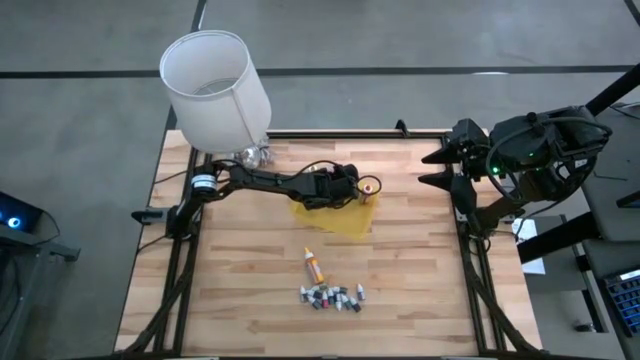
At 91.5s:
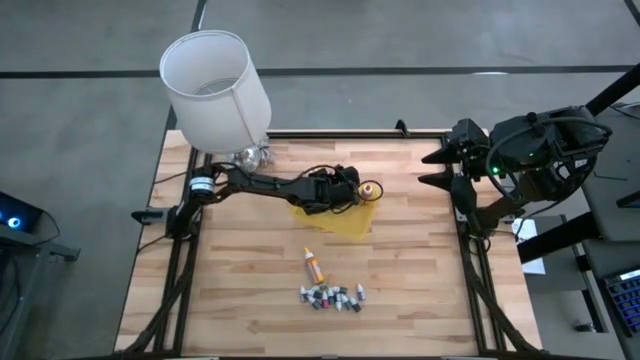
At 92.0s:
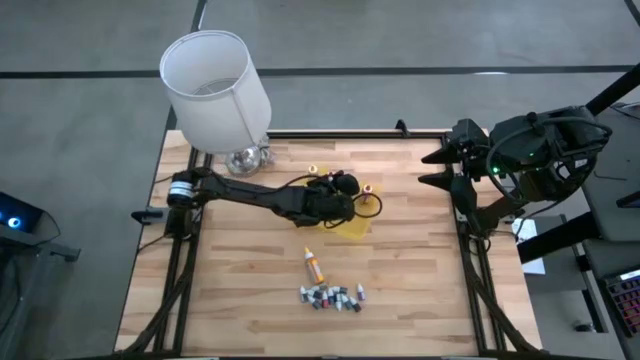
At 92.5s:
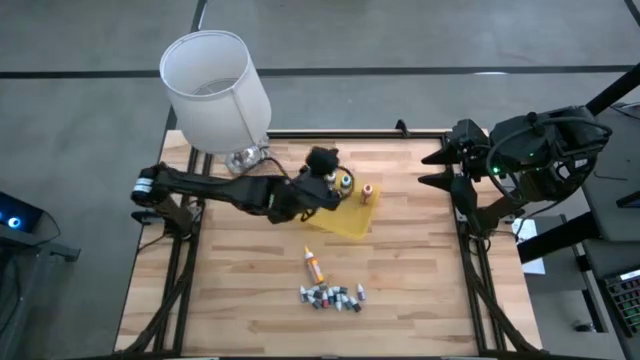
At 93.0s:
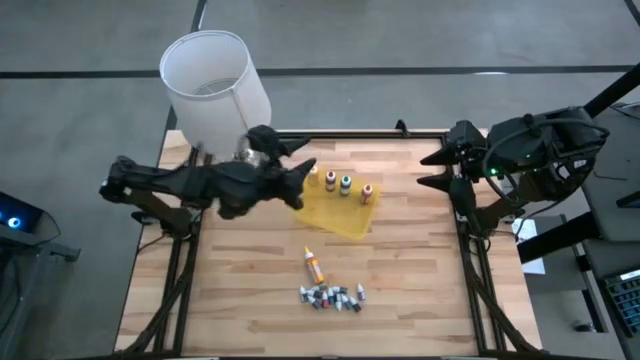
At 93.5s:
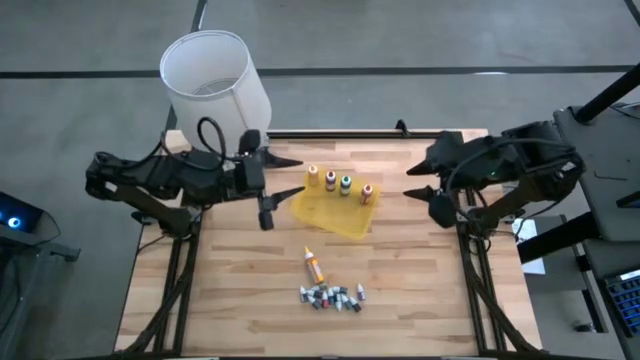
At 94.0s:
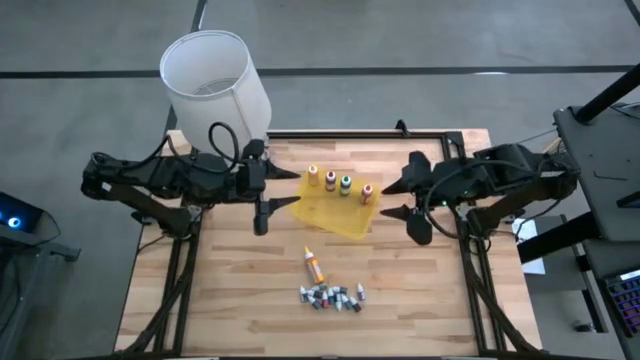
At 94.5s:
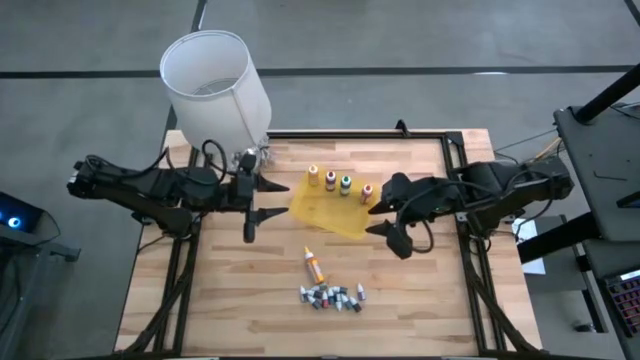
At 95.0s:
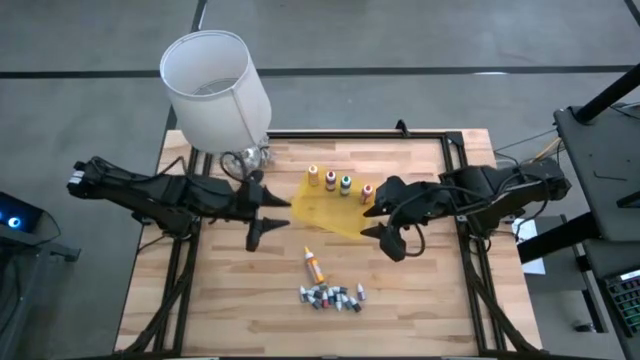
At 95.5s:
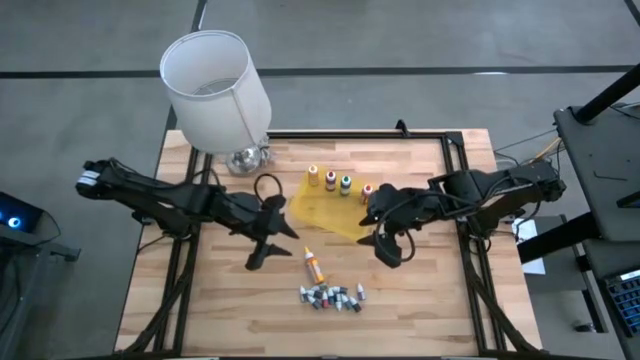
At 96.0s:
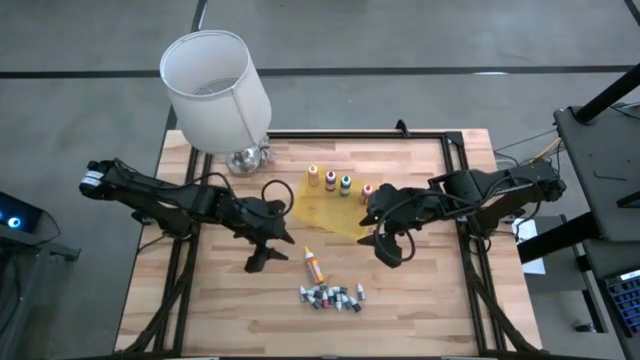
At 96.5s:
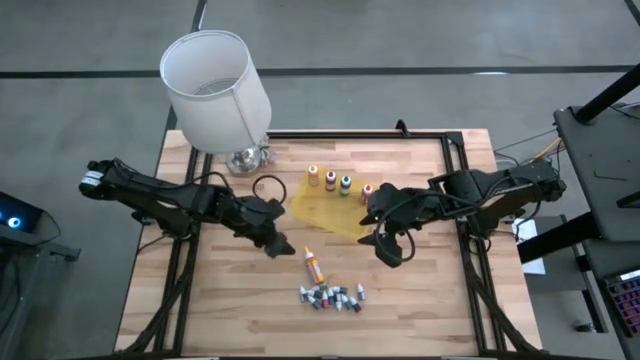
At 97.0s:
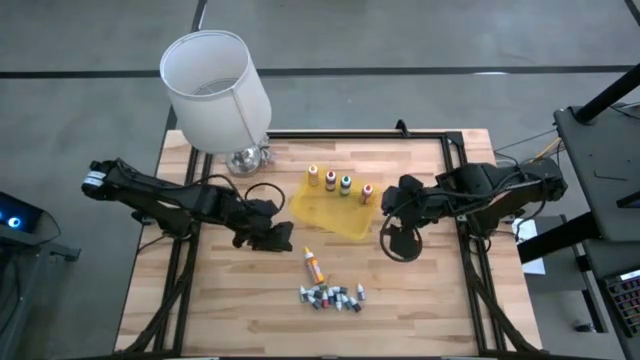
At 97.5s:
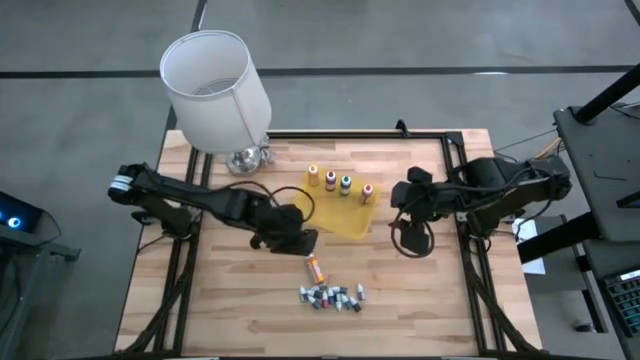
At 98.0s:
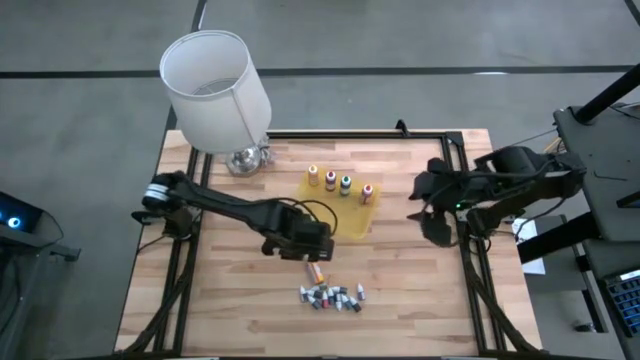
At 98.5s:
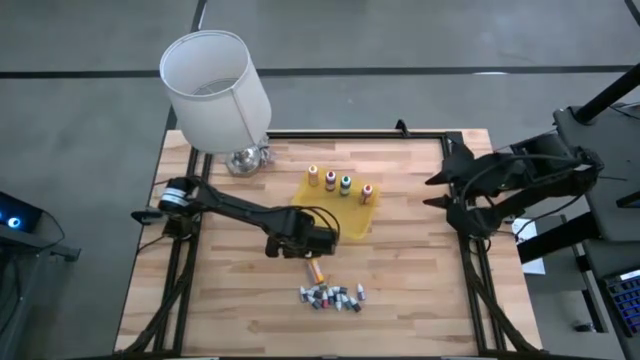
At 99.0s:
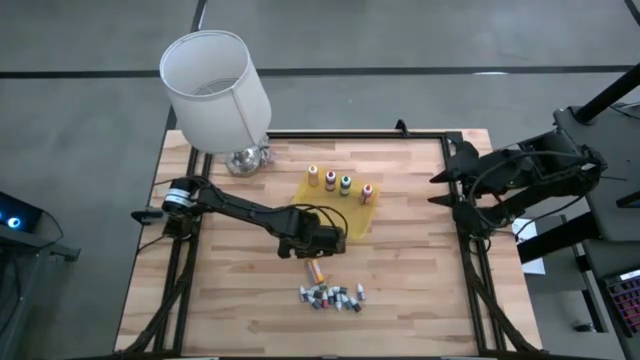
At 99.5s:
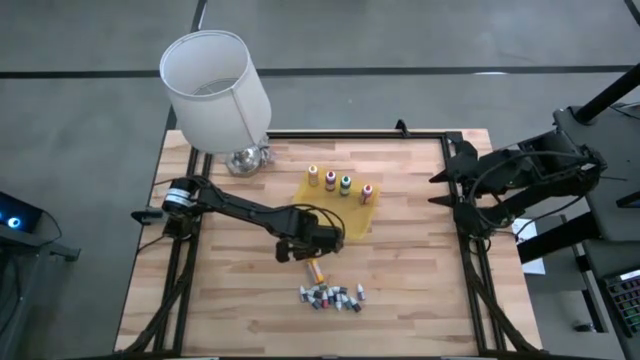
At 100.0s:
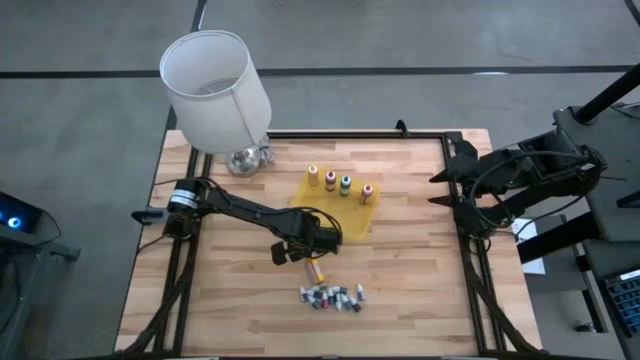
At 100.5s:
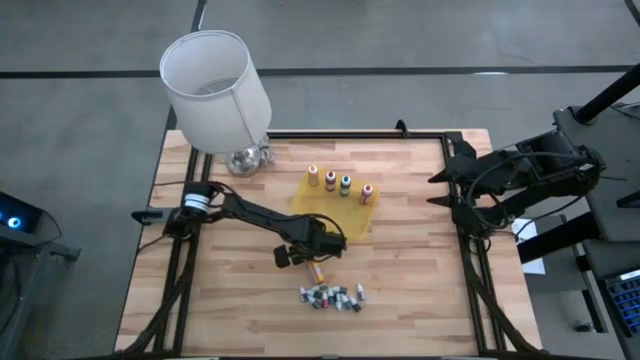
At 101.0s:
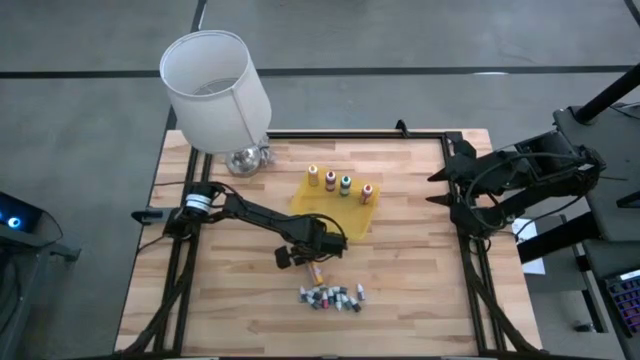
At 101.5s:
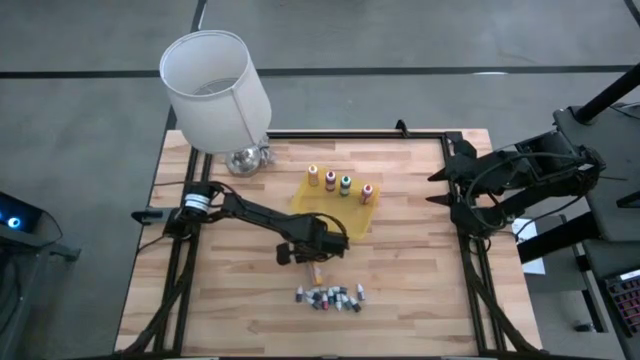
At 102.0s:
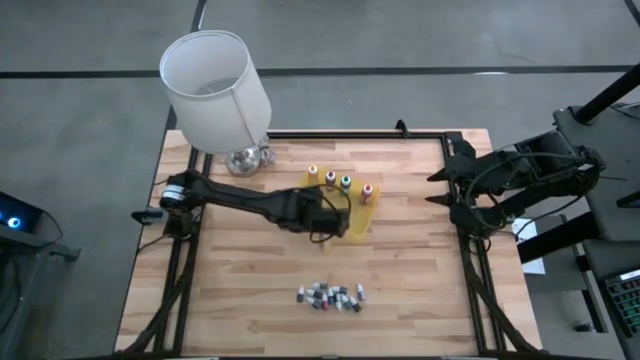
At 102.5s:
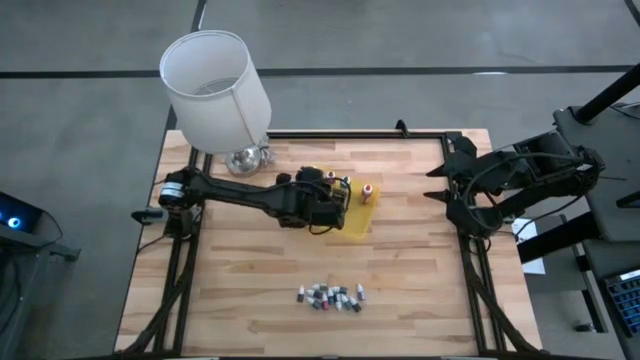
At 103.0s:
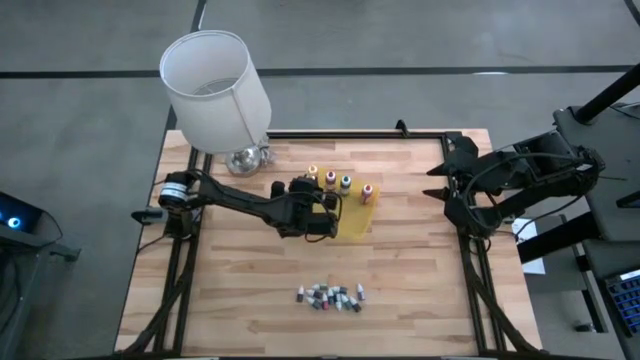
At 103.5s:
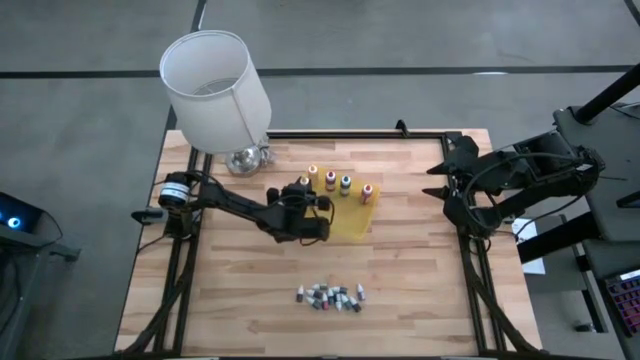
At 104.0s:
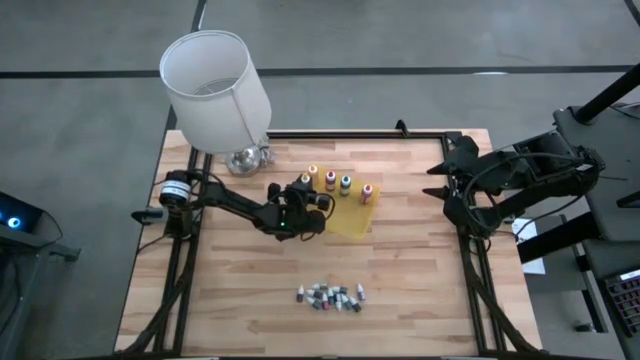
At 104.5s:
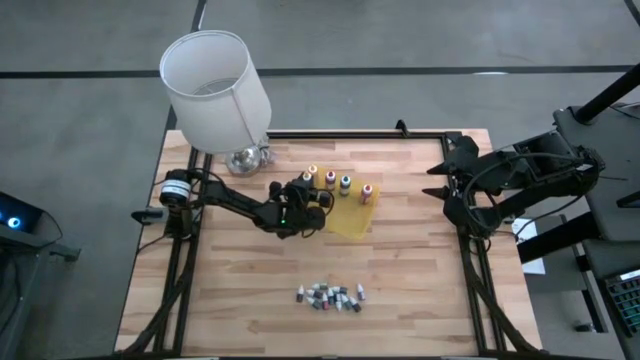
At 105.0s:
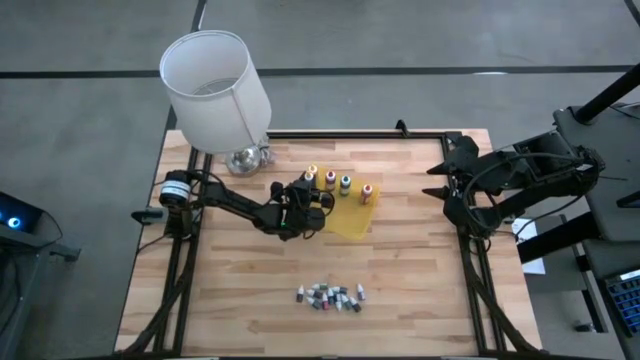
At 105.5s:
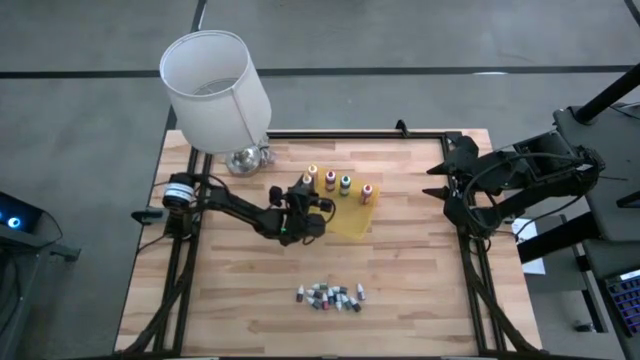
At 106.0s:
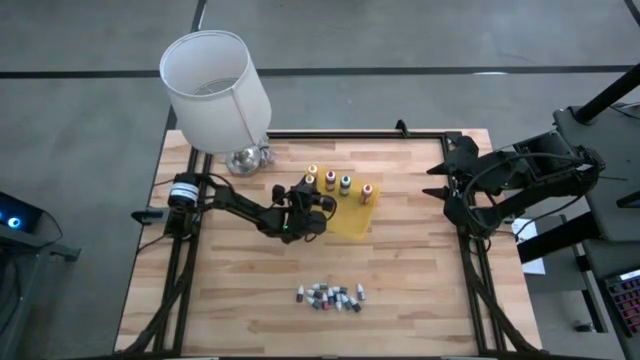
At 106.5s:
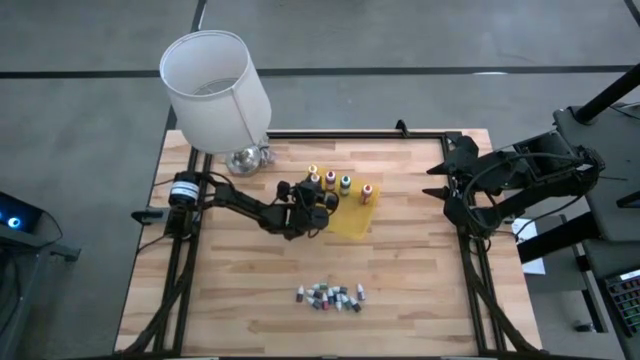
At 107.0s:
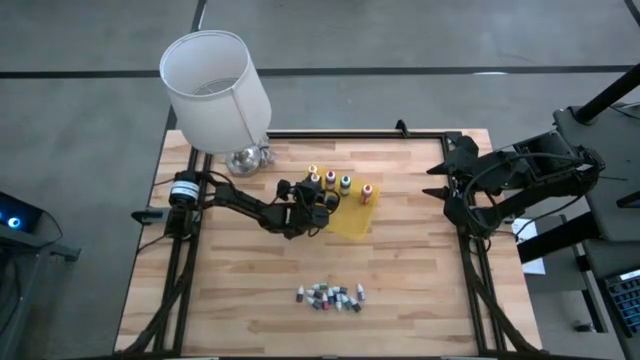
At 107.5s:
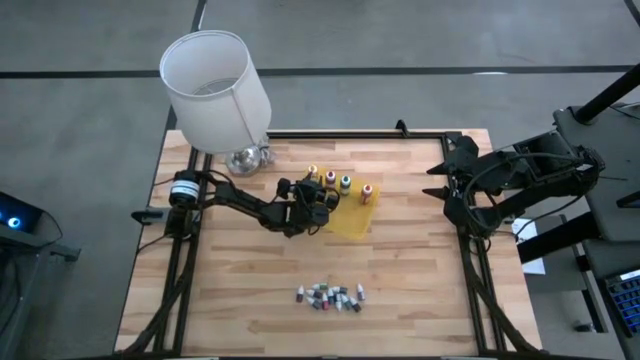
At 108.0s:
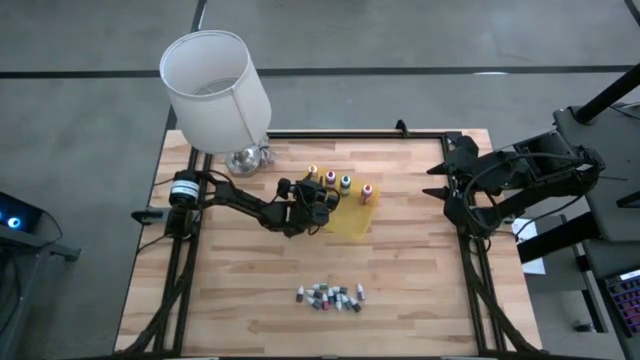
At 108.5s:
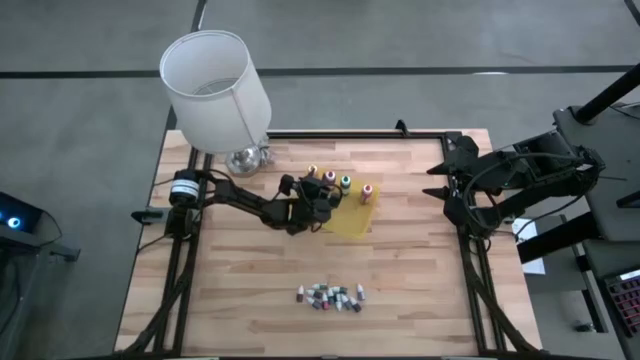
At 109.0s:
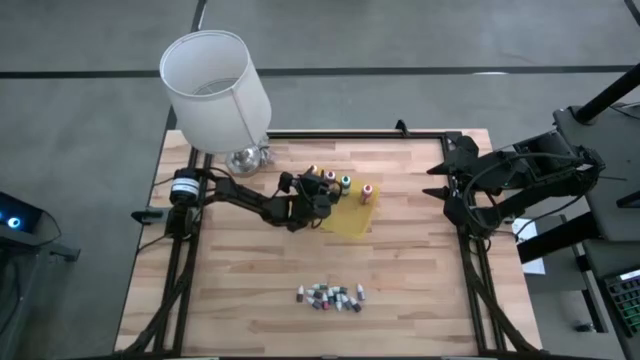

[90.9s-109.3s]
Task: Pick & Place food coloring
Put the large yellow food coloring bottle into the yellow bin

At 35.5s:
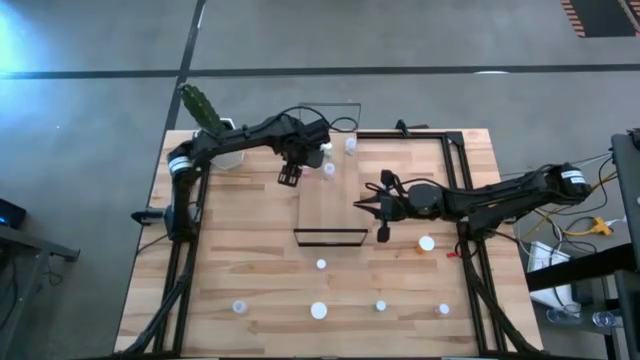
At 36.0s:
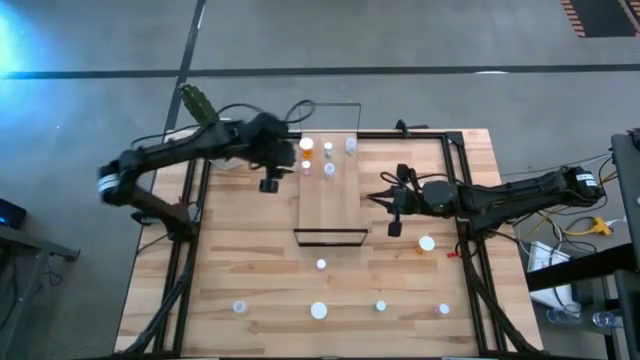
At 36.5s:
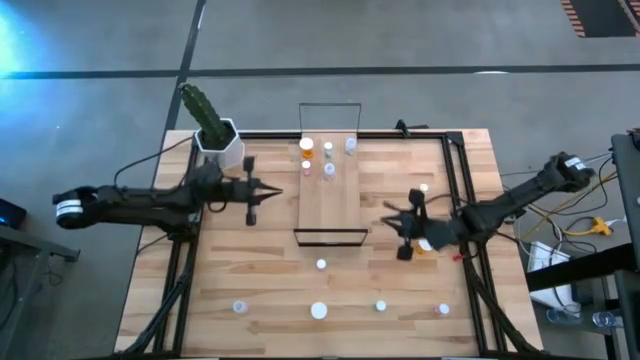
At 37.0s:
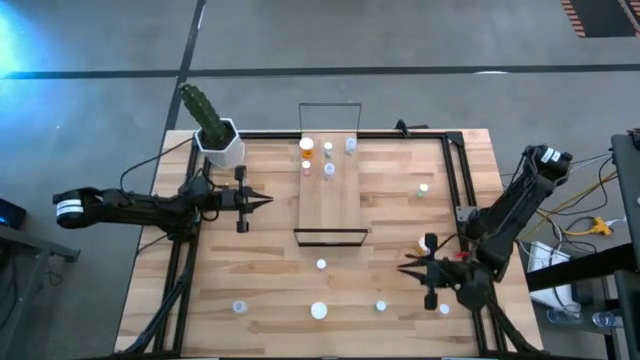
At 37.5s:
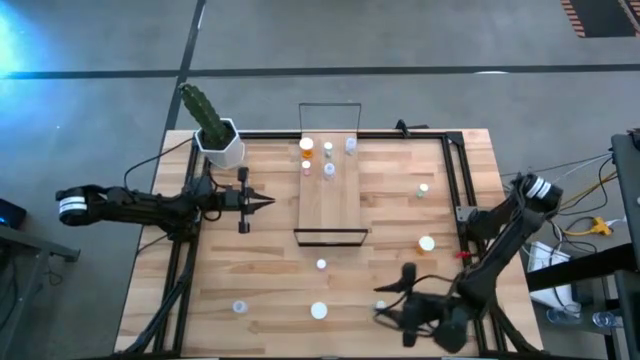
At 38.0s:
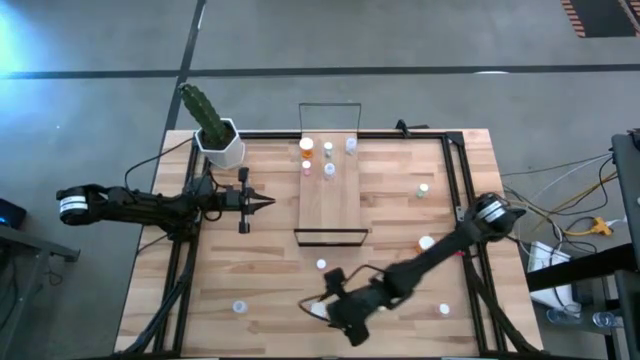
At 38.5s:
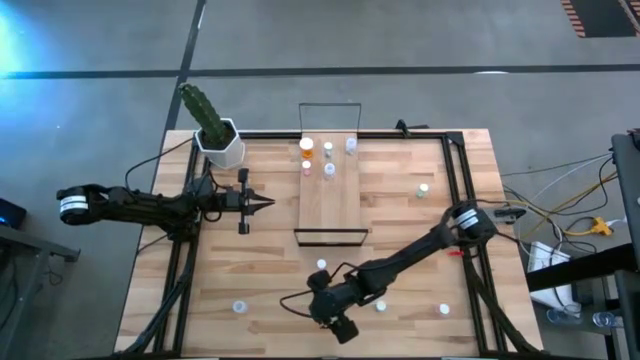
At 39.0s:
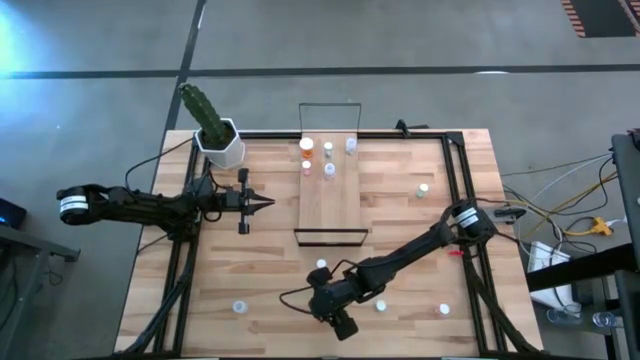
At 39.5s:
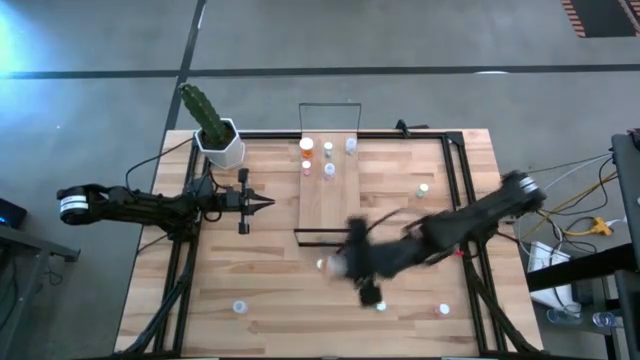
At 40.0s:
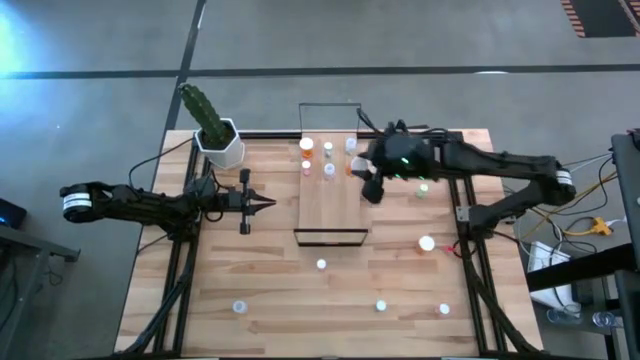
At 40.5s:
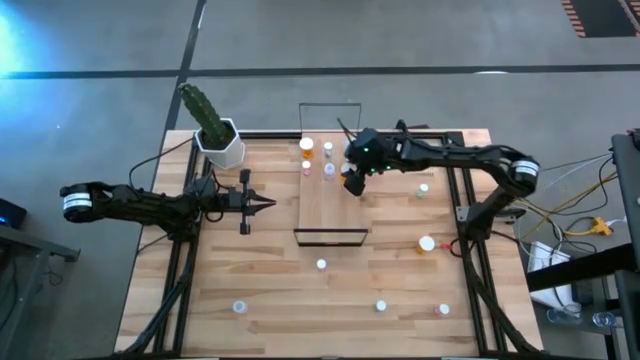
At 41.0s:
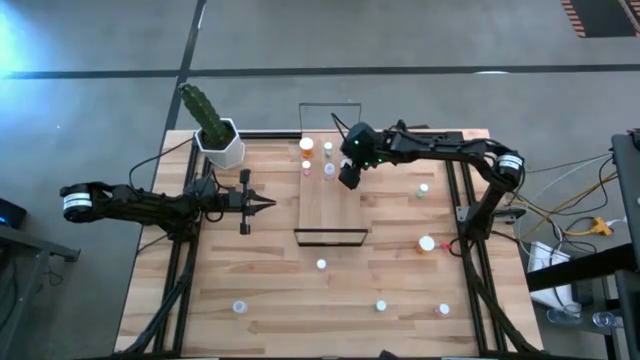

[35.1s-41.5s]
Task: Pick and place medicine bottles onto shelf by color
Put the bottom yellow transparent pill bottle on the shelf
